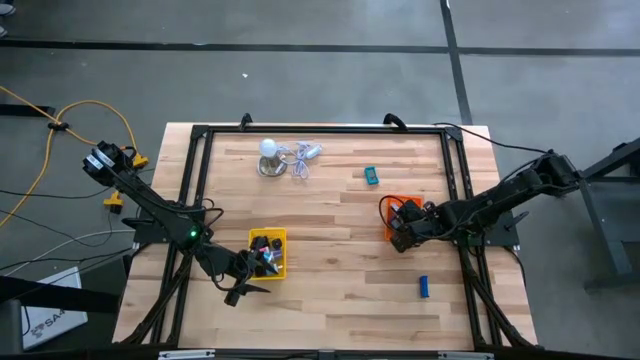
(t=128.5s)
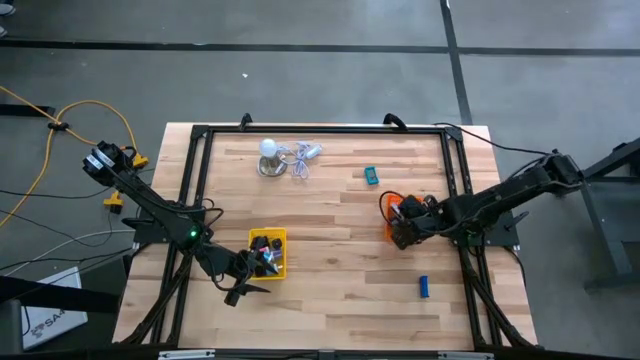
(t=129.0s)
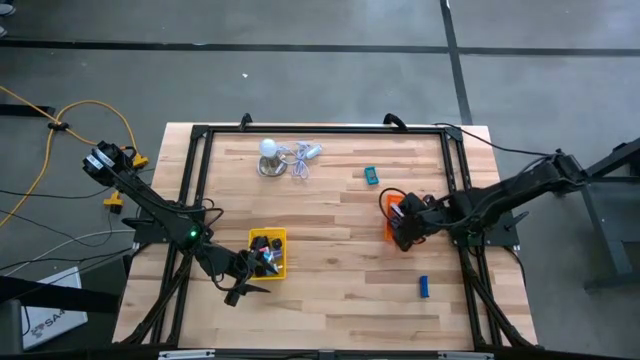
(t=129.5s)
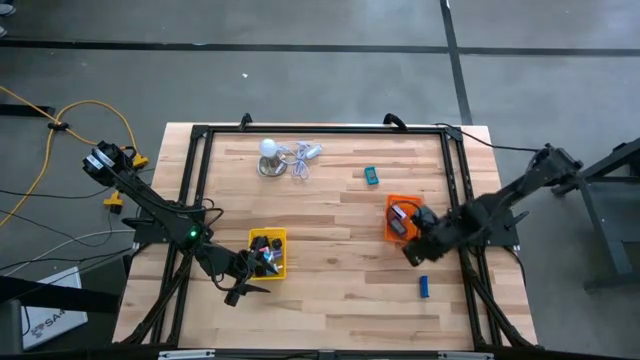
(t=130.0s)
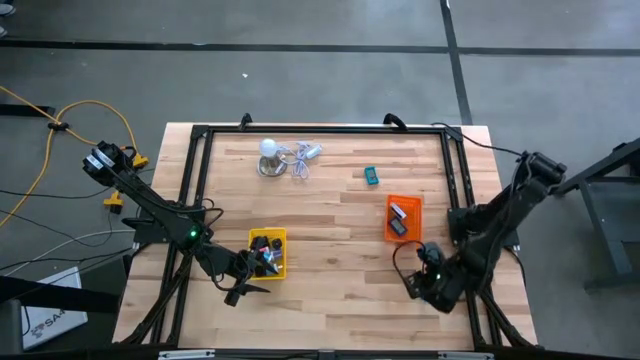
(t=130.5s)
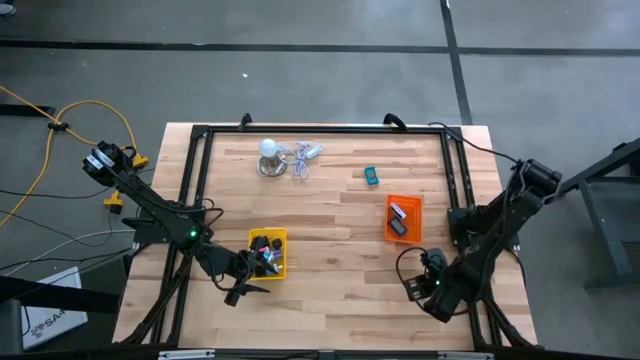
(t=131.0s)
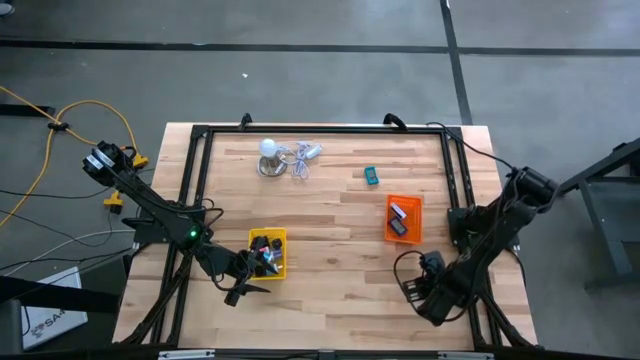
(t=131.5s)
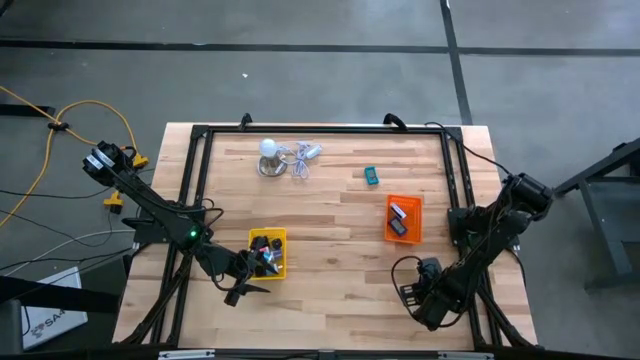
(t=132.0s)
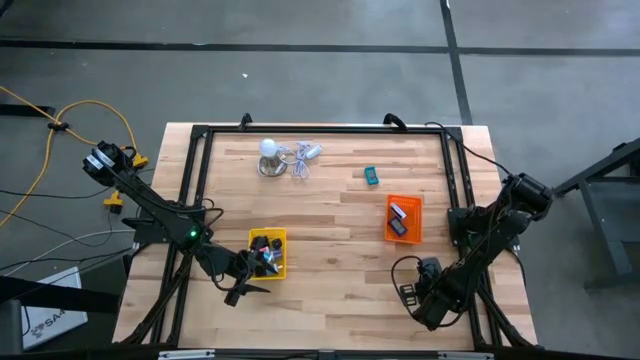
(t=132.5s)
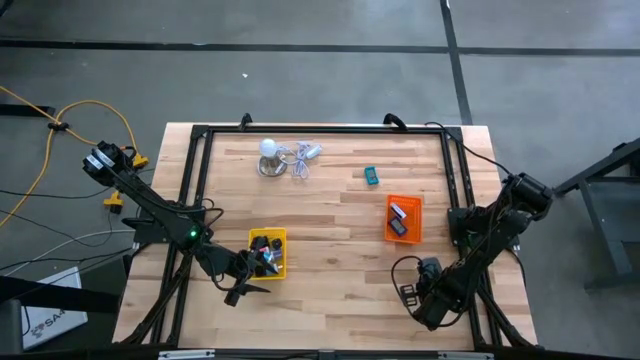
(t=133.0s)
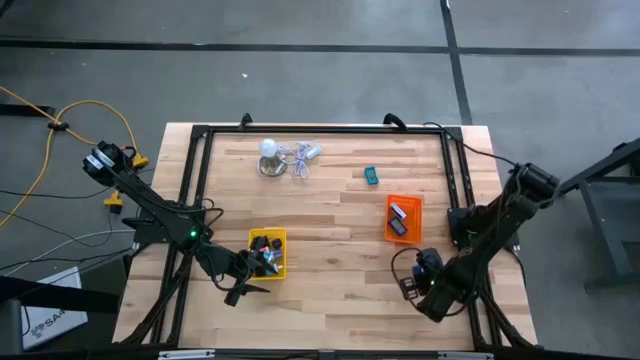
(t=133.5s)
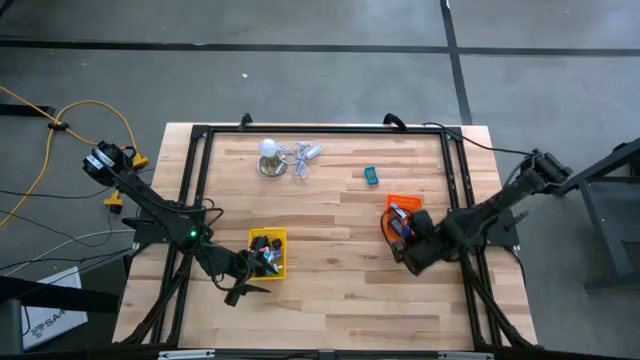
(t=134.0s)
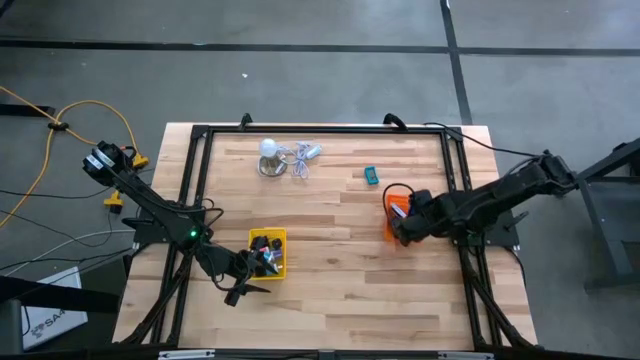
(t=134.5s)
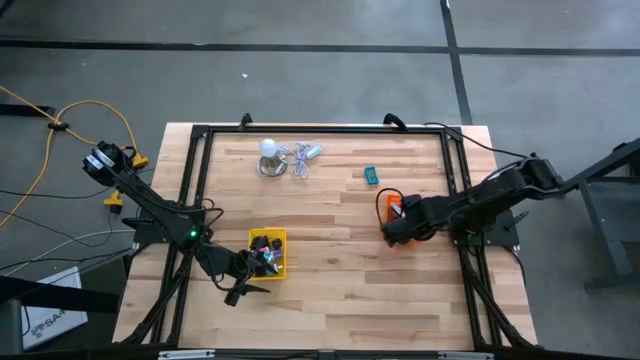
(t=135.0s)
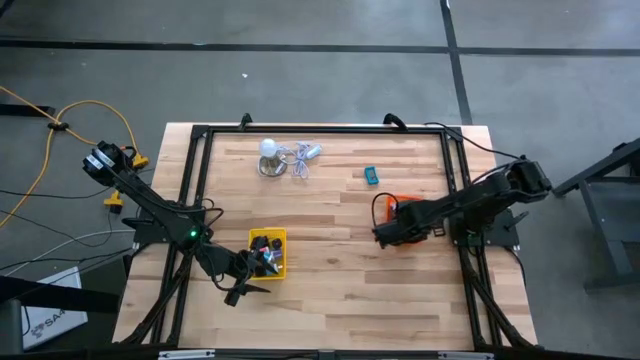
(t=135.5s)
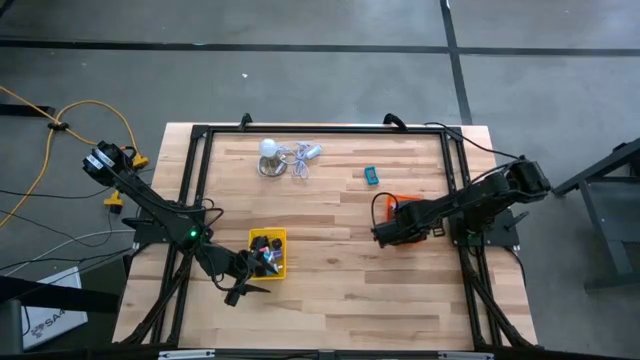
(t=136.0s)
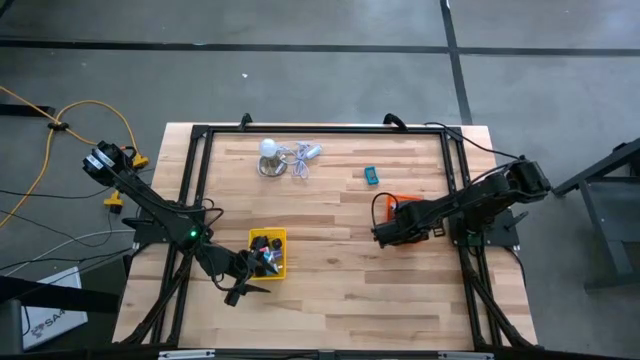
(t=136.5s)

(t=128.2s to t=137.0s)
Task: Pick & Place Office items
Put the dark blue digital clock into the orange bin

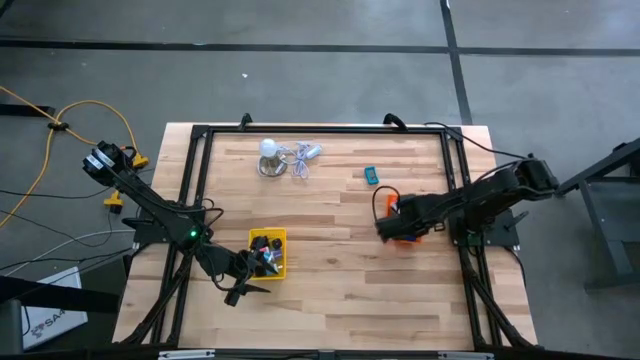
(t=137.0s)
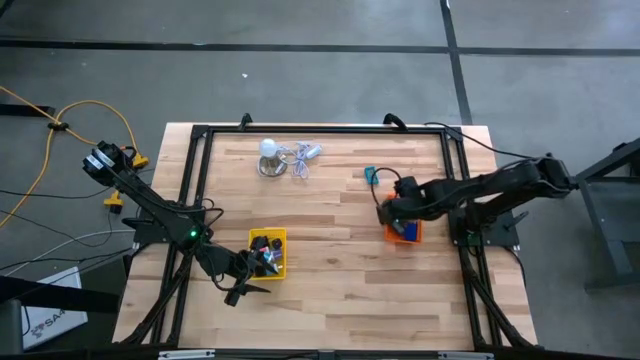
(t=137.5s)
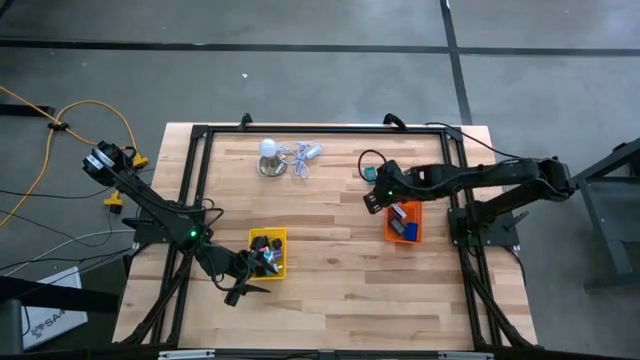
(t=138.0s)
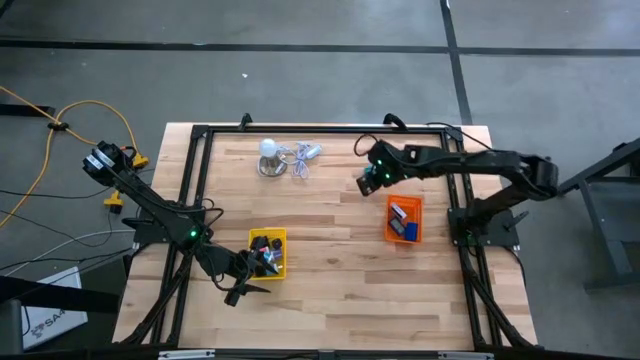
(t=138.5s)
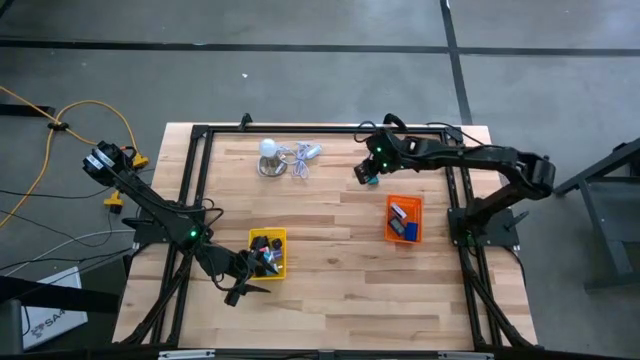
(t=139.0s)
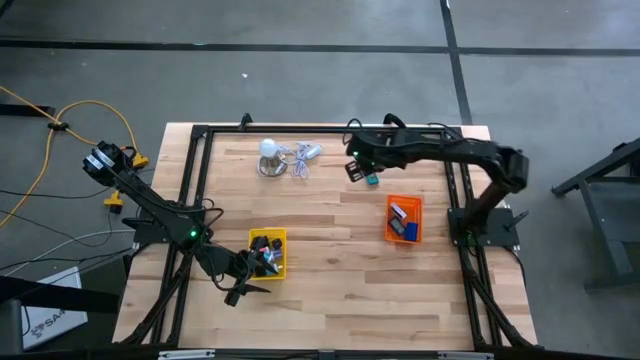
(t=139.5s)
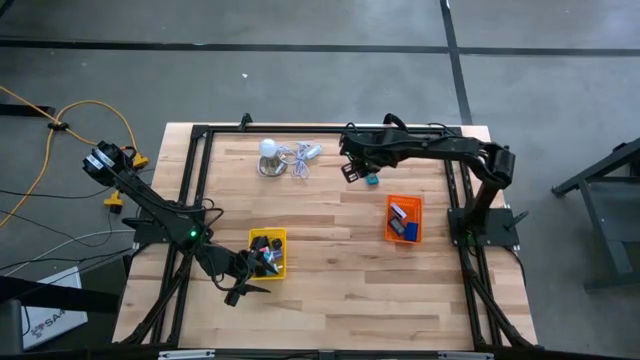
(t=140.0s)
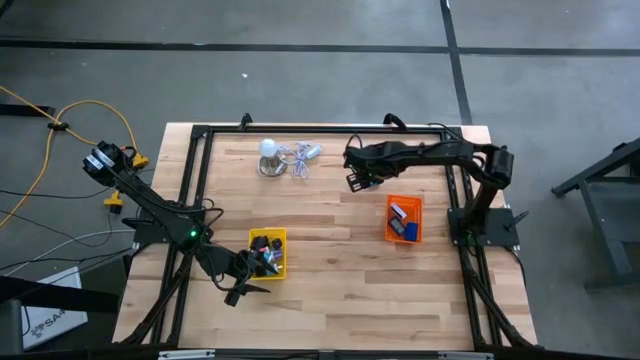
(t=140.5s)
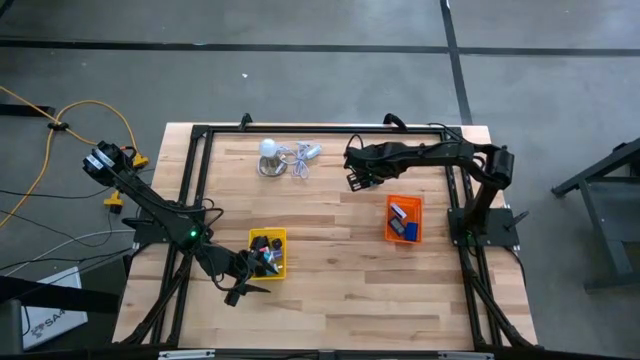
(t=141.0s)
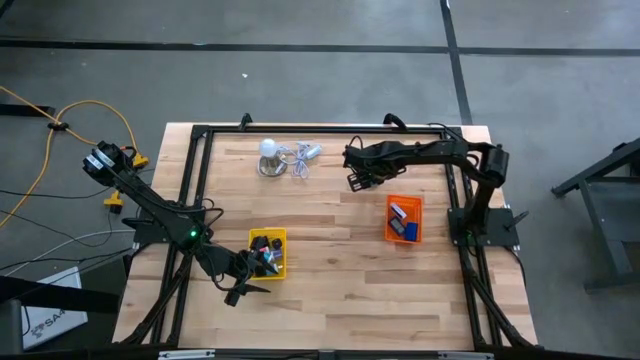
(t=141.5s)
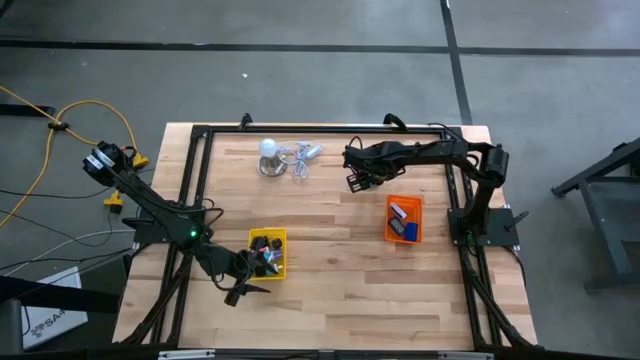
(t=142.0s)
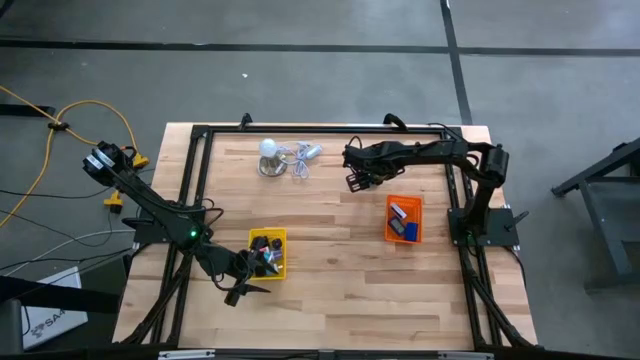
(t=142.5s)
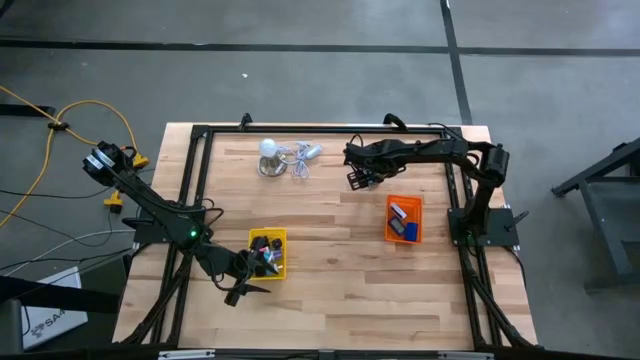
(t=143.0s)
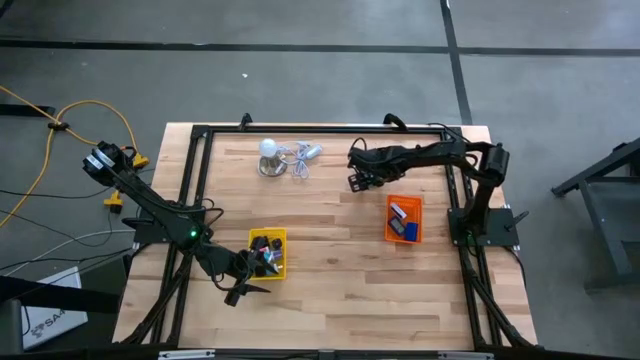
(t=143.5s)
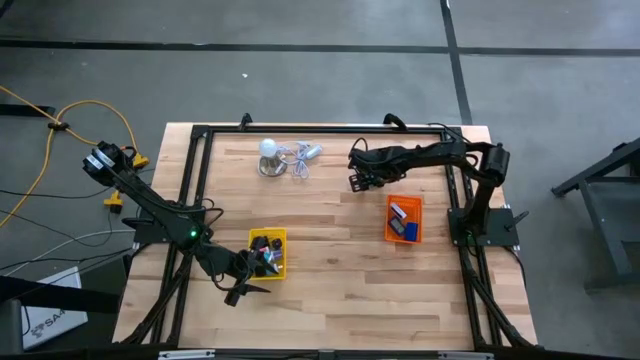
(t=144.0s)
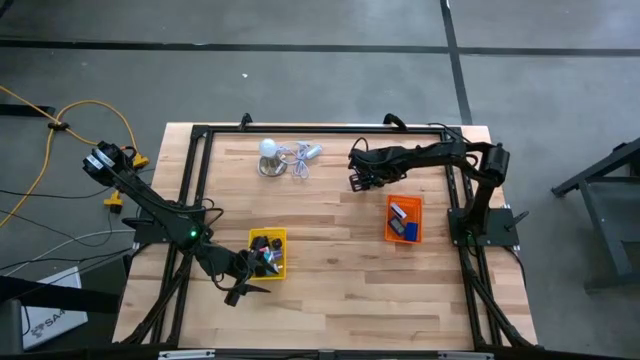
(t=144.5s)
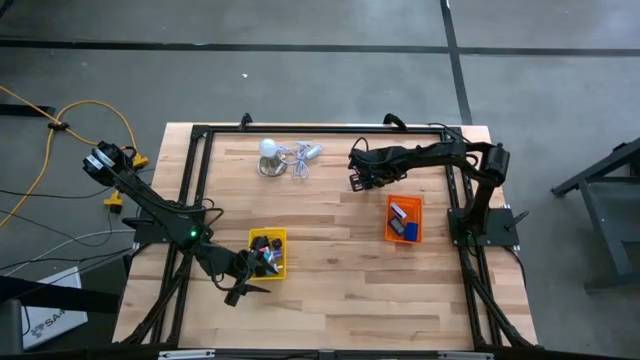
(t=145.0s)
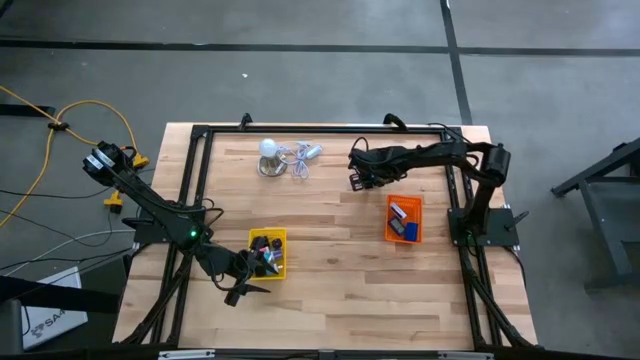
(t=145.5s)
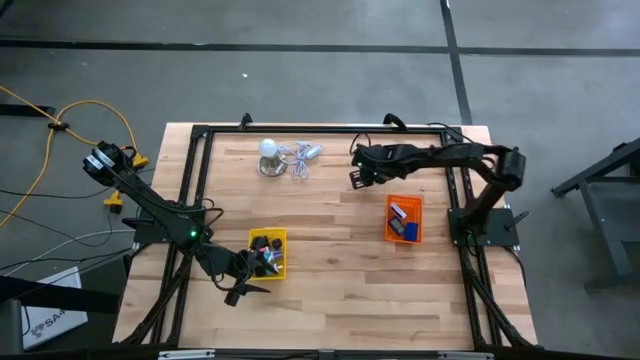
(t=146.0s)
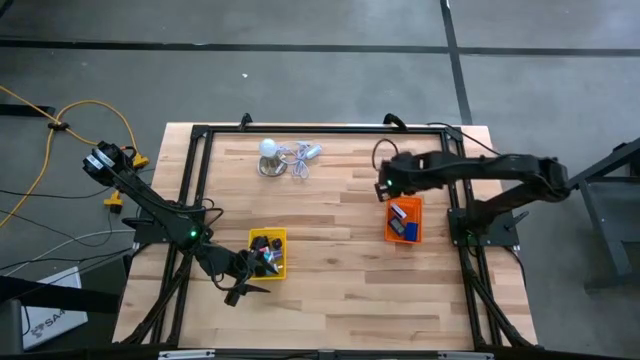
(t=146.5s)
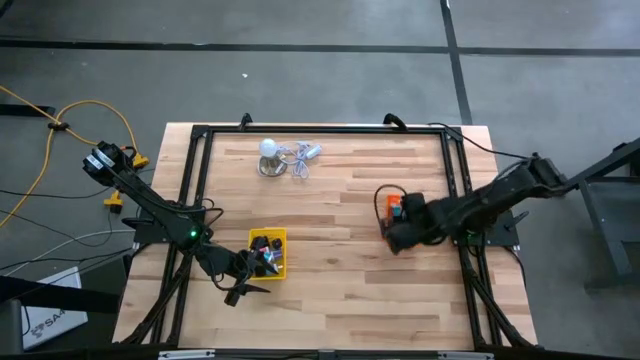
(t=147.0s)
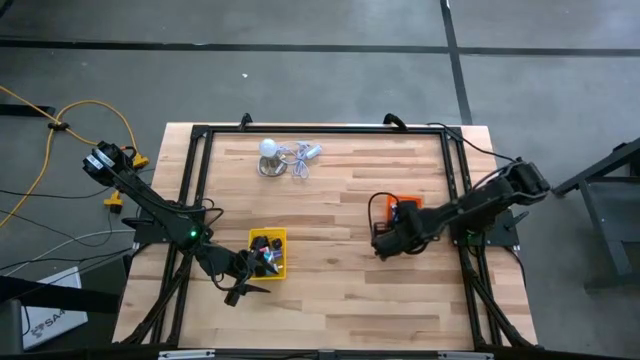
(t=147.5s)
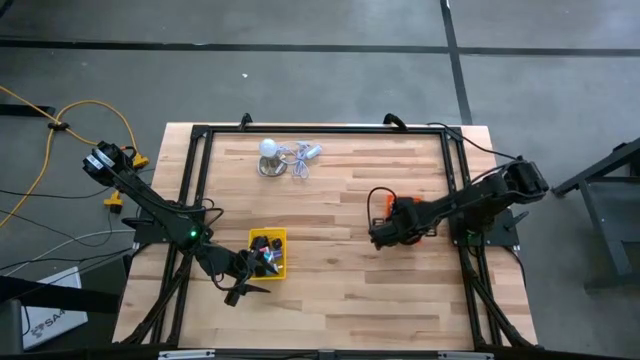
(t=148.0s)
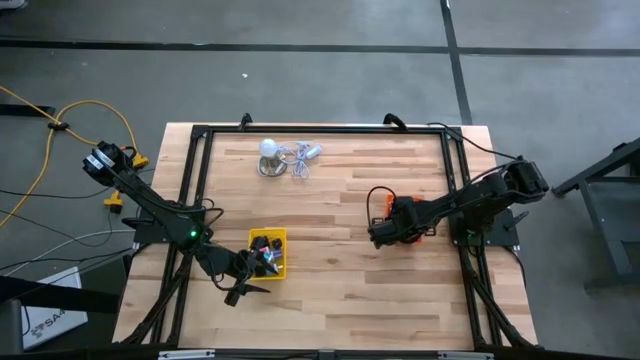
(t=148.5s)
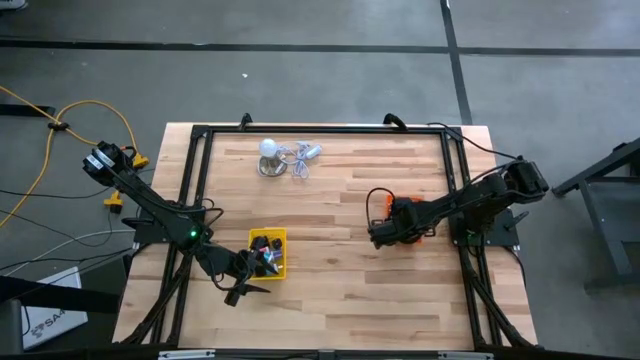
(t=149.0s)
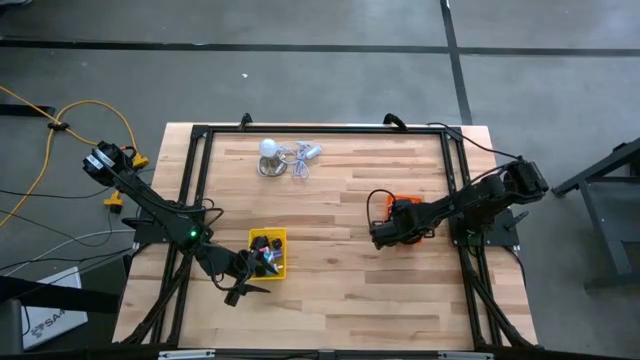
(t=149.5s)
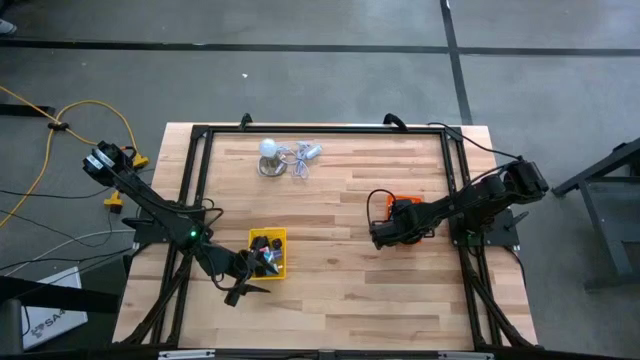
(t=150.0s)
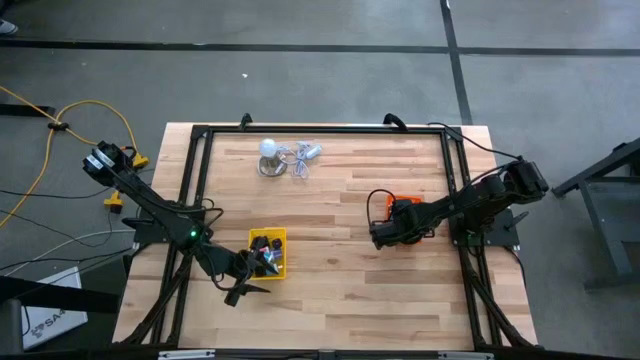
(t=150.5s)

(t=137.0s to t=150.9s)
Put the light blue digital clock into the orange bin
